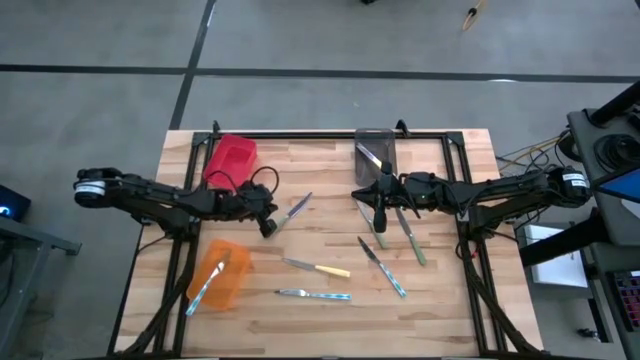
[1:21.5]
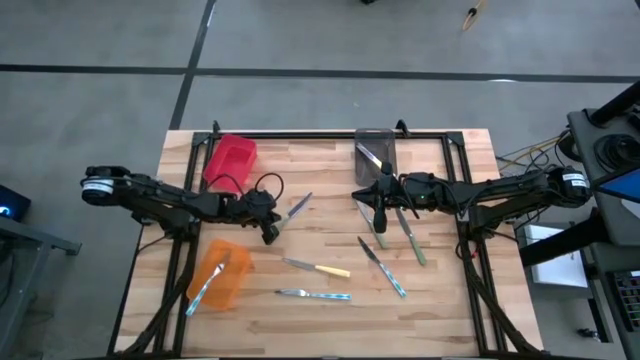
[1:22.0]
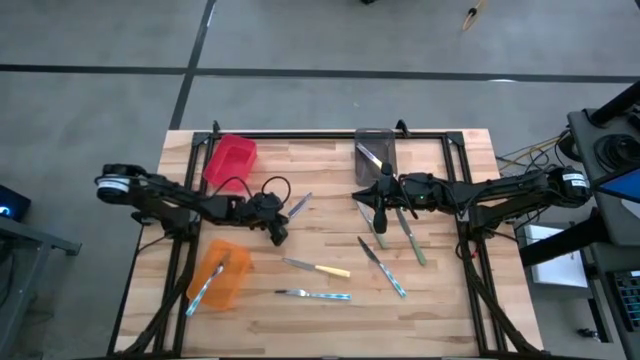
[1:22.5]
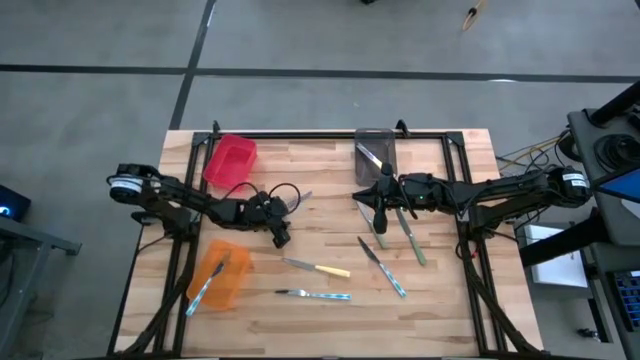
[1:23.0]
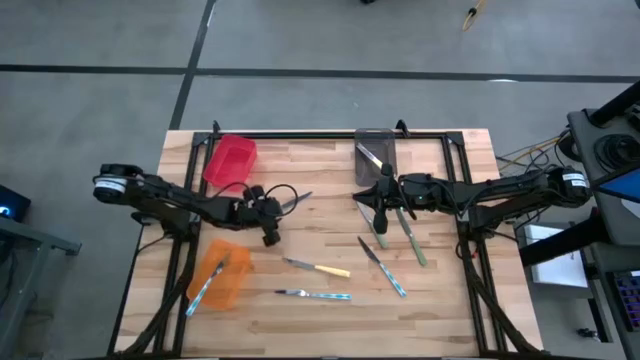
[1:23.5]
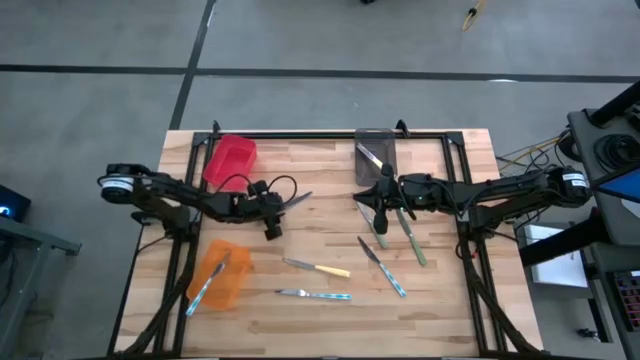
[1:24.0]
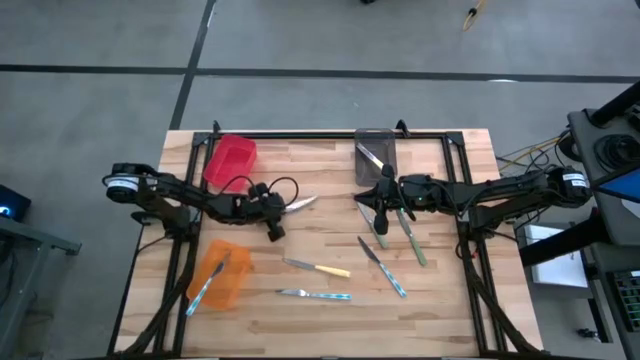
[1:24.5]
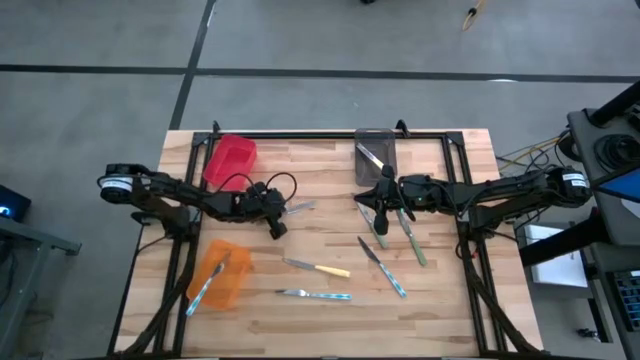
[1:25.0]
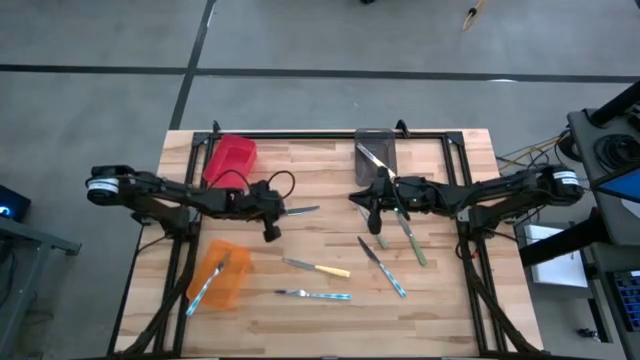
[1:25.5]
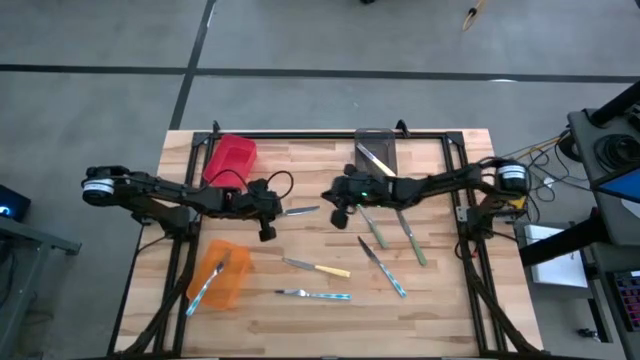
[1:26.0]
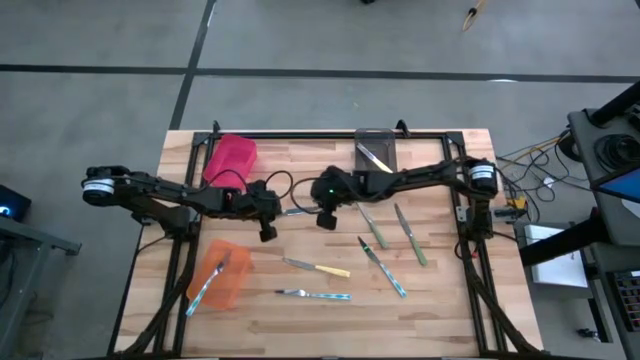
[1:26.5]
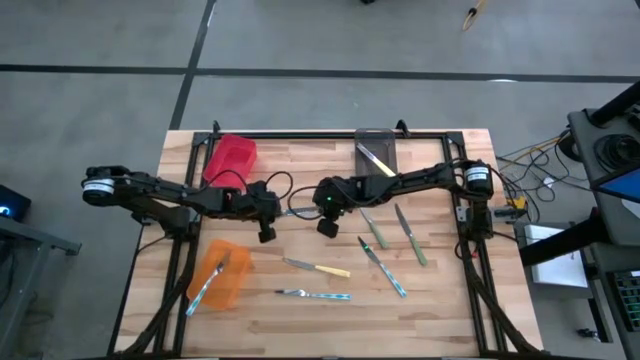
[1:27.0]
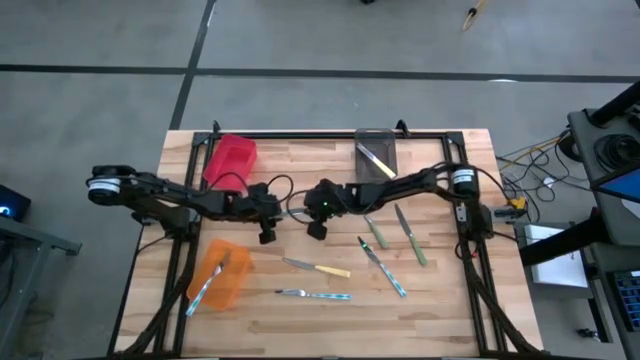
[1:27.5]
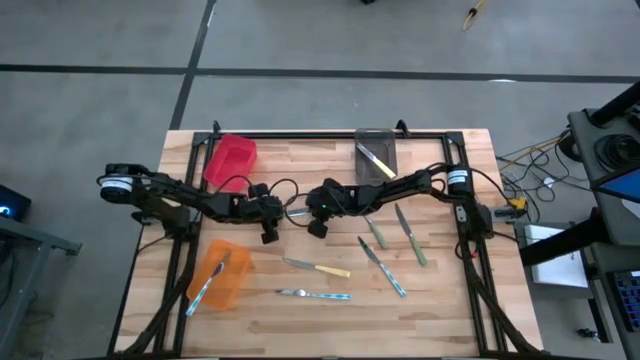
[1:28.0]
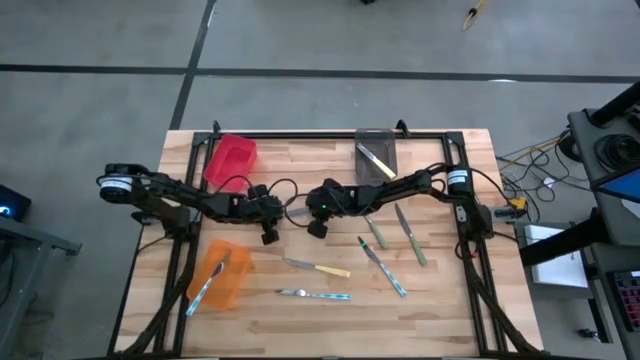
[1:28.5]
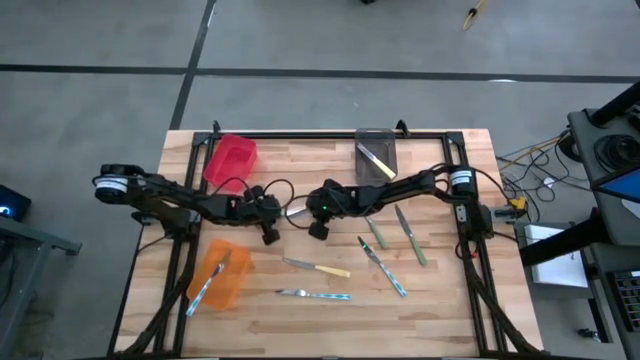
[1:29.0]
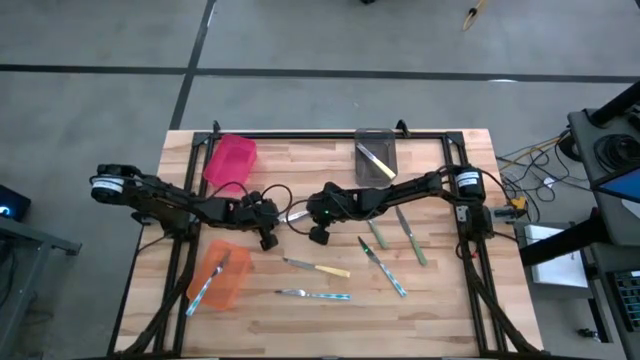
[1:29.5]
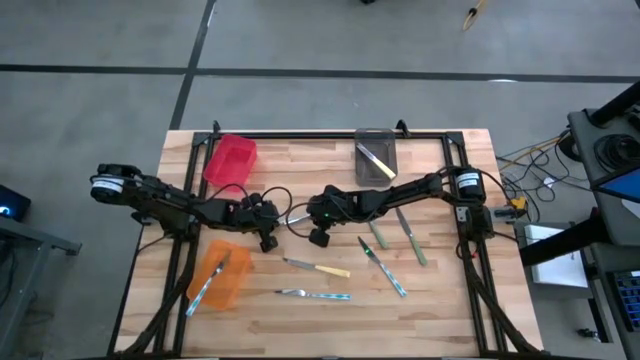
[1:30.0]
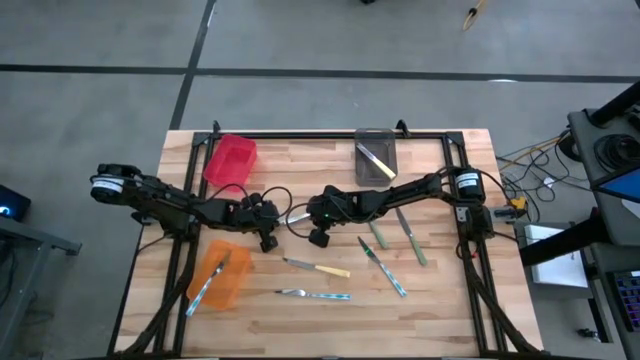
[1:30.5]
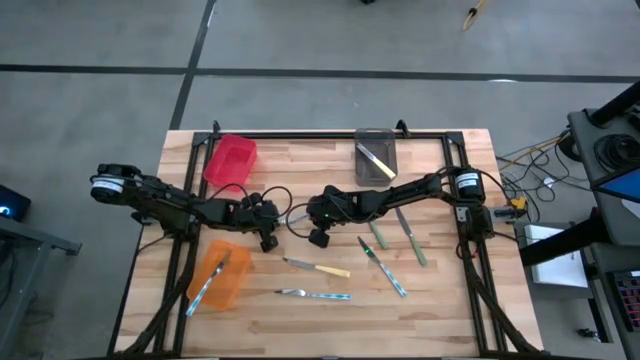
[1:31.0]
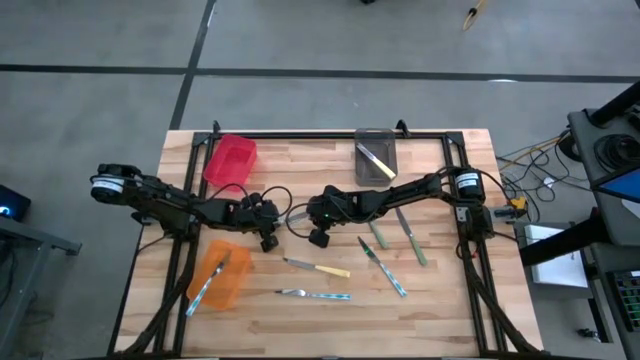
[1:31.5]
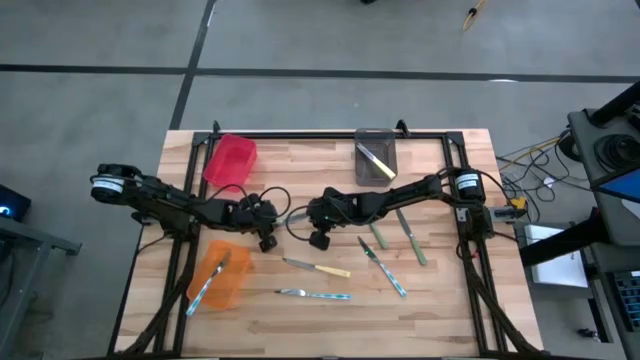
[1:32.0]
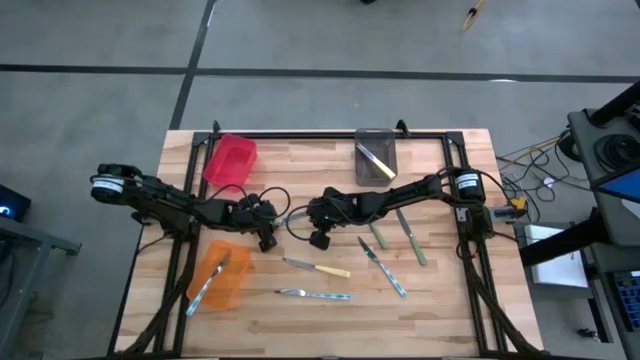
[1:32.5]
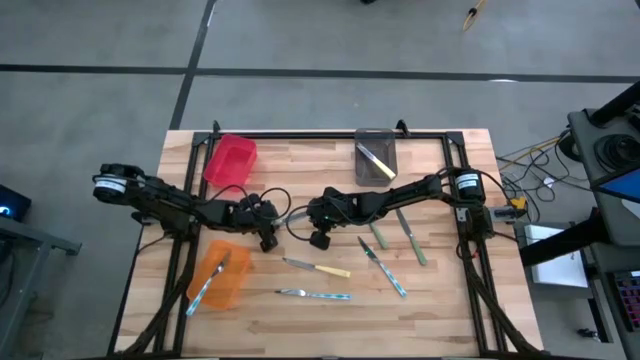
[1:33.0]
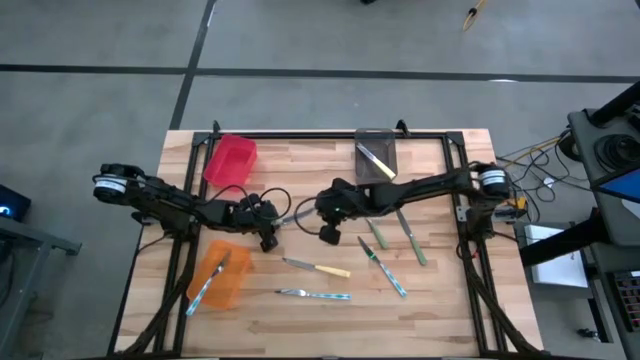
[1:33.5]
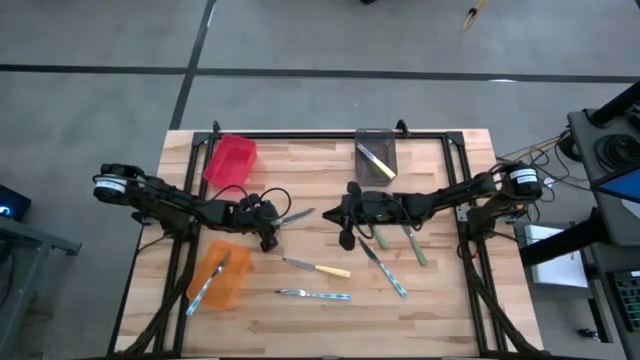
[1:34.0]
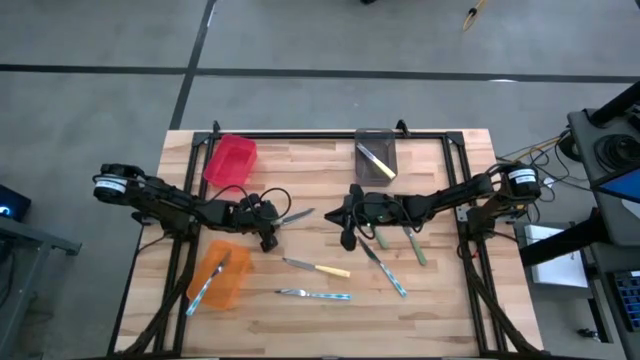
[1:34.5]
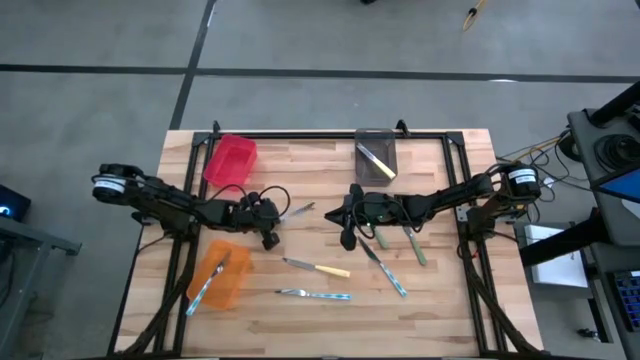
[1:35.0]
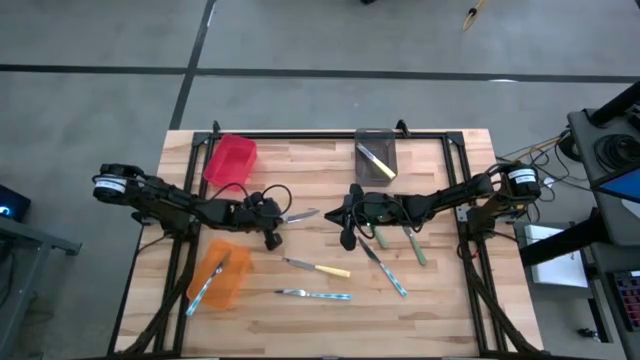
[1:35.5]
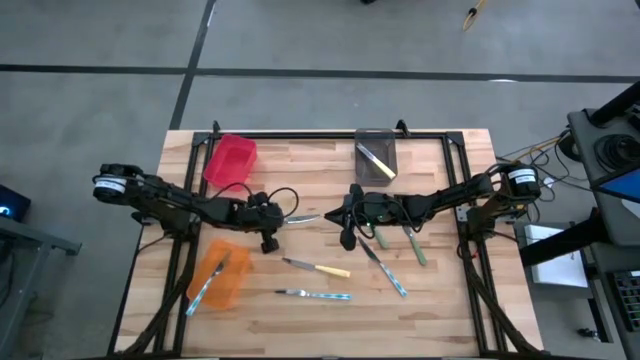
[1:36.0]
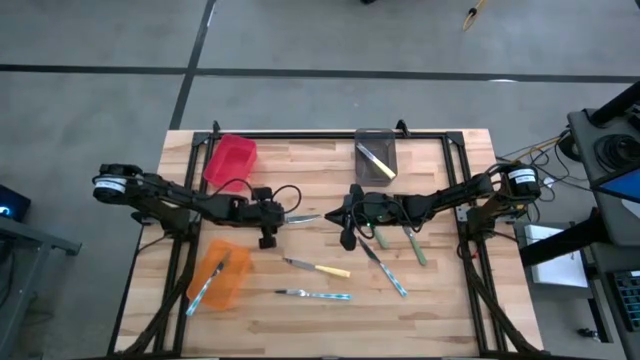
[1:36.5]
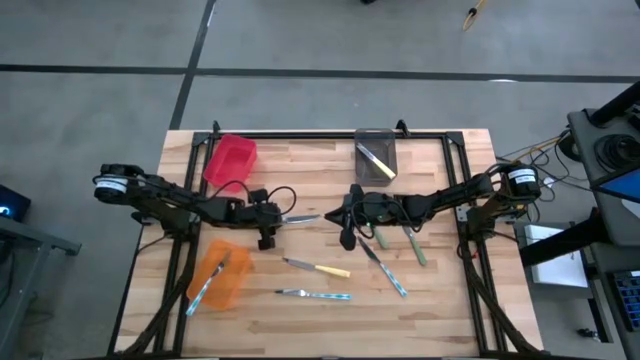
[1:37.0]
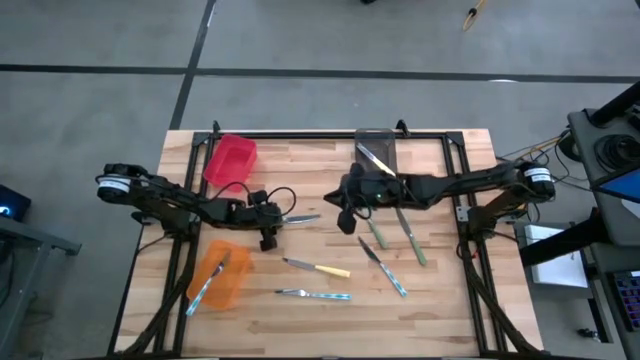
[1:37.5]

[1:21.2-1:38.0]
Task: Sort silverware by color (type)
Put the left green knife into the red bin

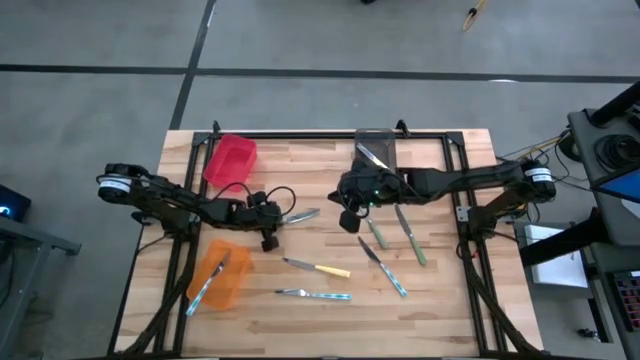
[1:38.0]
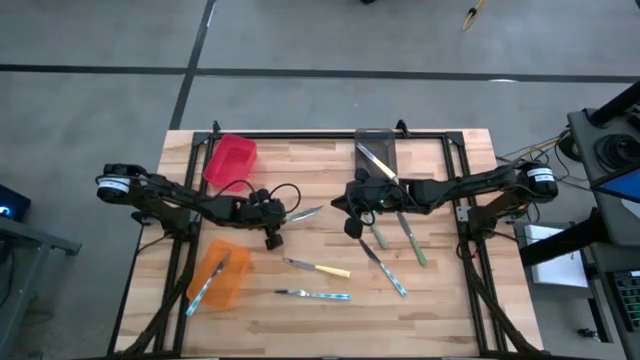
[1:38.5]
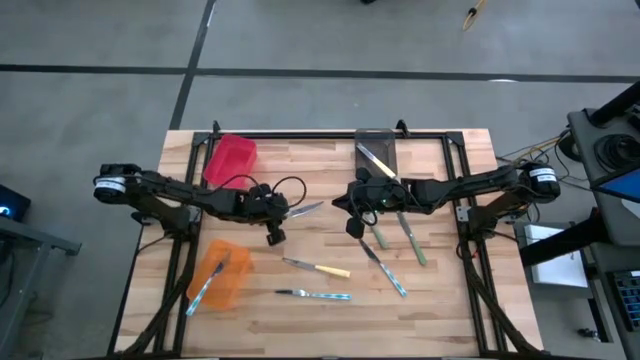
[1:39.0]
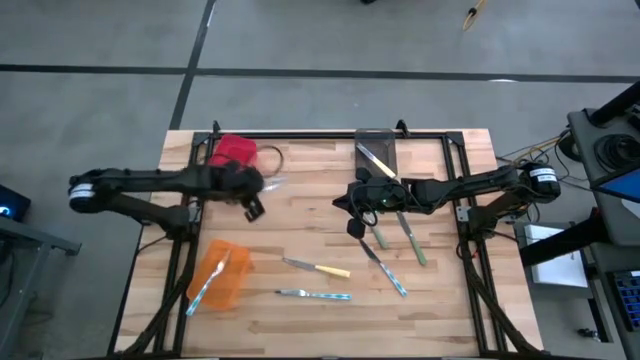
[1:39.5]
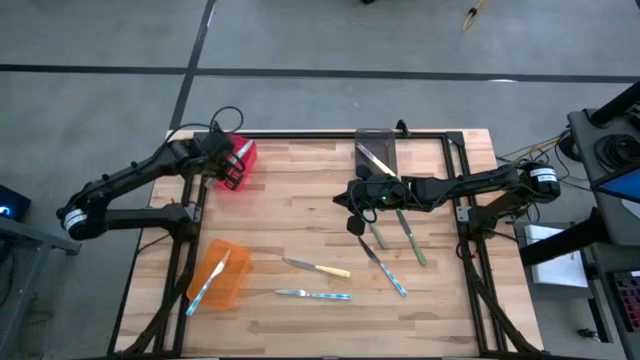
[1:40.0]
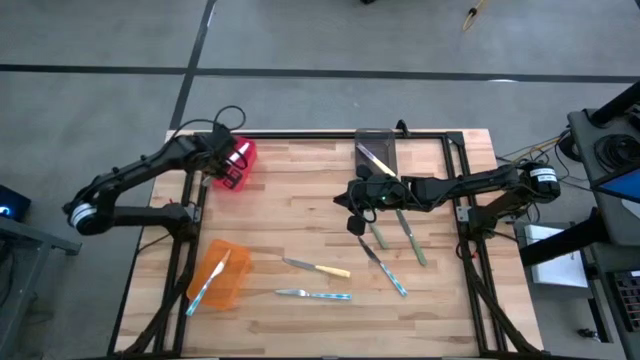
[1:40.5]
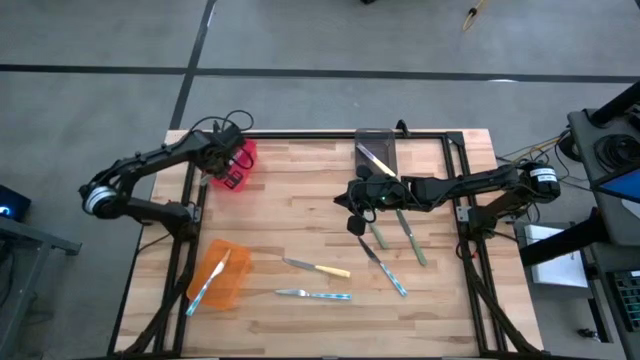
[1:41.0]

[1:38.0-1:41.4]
Put the left green knife into the red bin

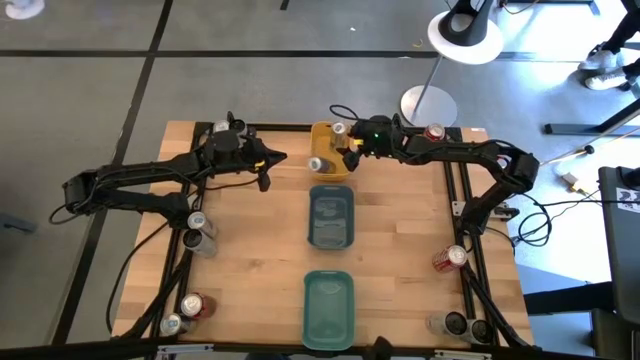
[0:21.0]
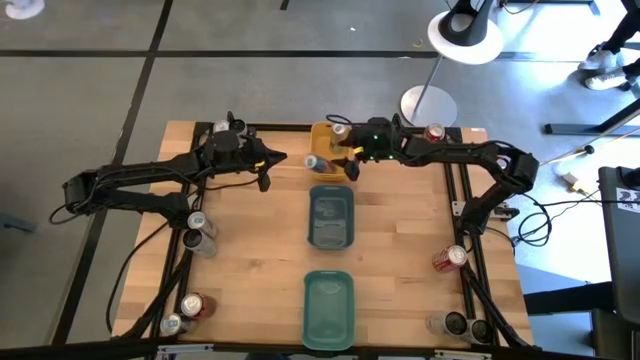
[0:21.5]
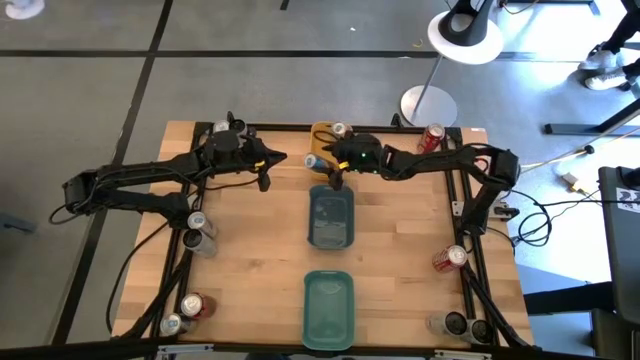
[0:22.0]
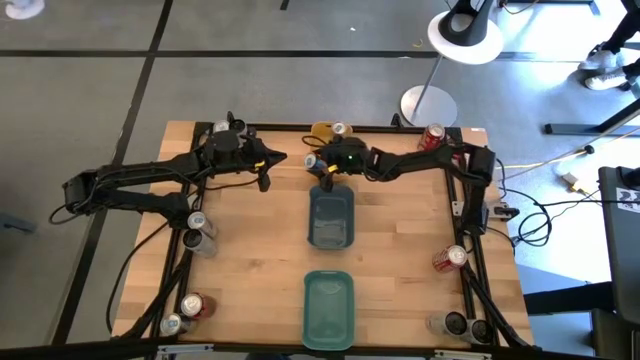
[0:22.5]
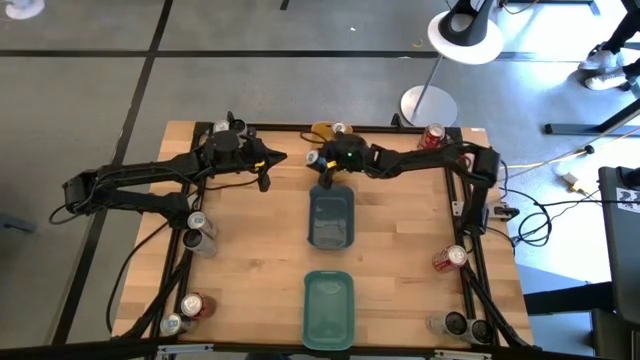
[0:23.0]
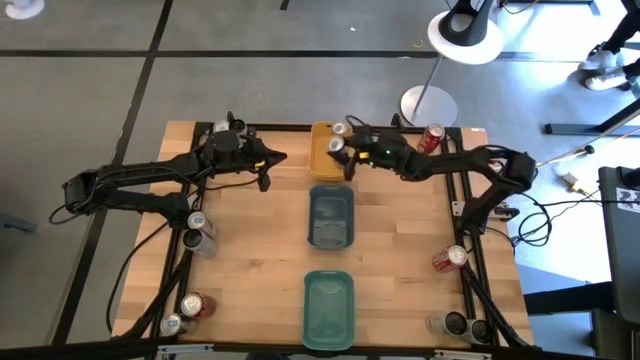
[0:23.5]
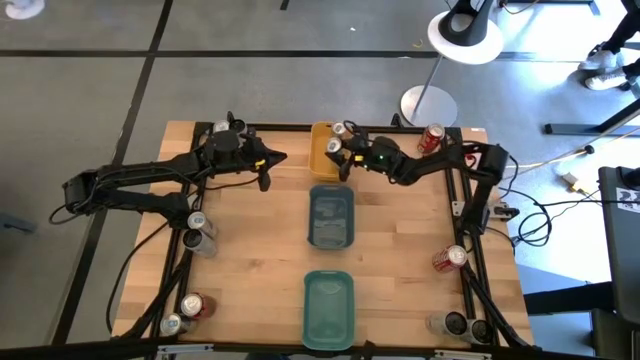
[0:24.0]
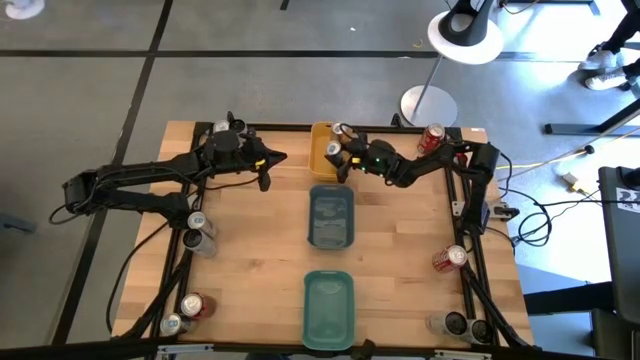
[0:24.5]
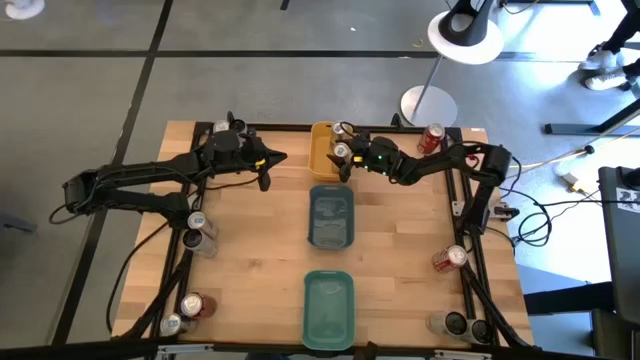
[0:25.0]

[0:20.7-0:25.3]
Task: Sort soda cans
Put the top right blue soda can into the yellow bin
